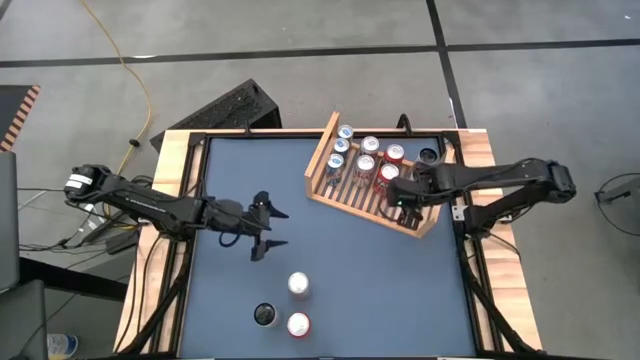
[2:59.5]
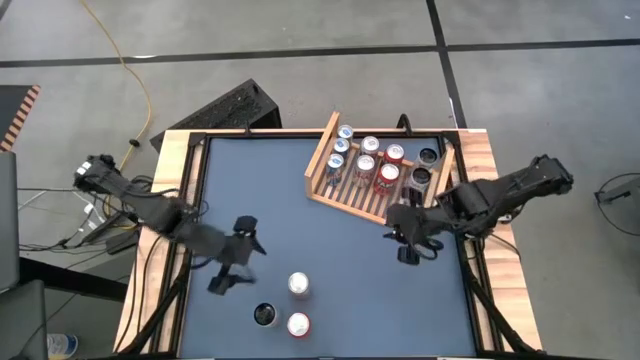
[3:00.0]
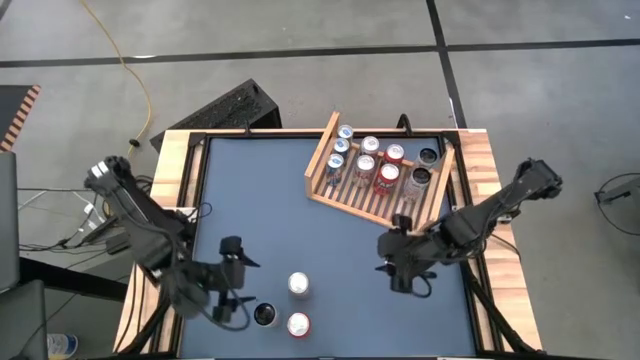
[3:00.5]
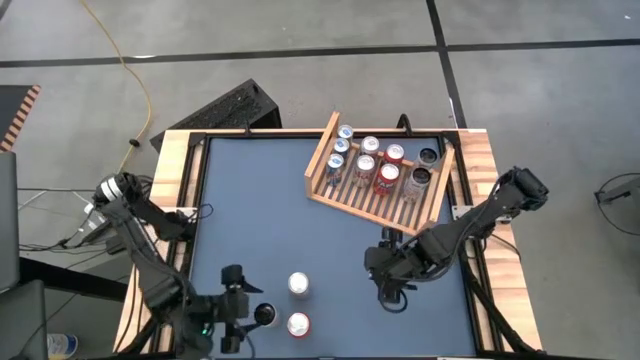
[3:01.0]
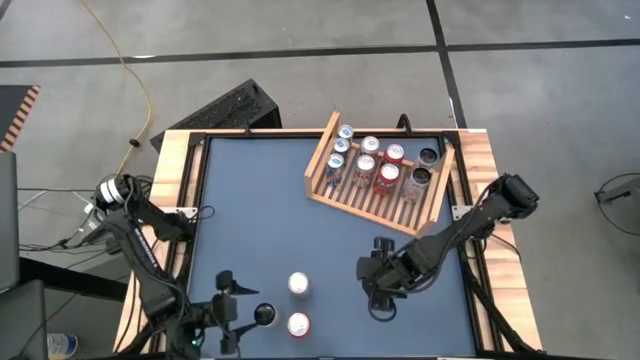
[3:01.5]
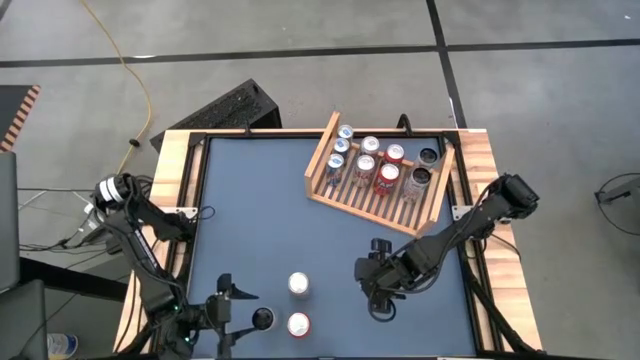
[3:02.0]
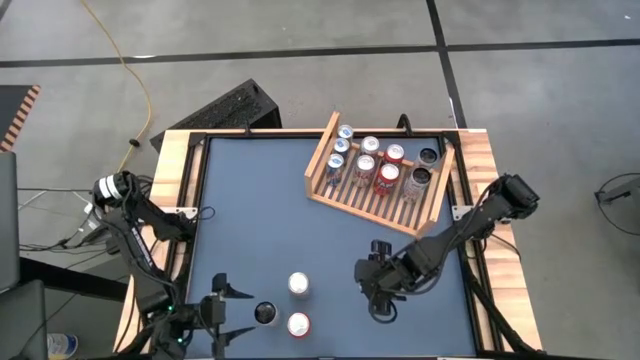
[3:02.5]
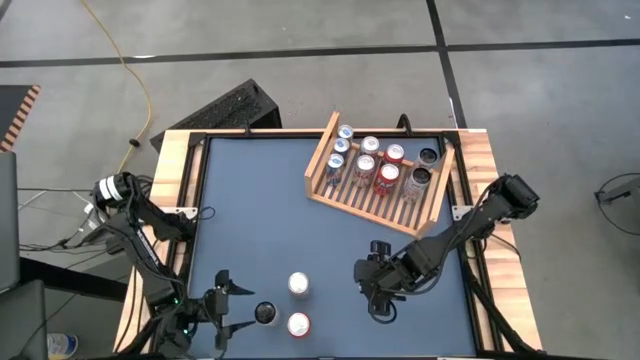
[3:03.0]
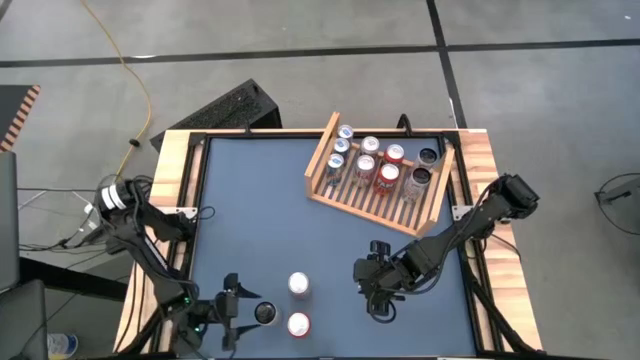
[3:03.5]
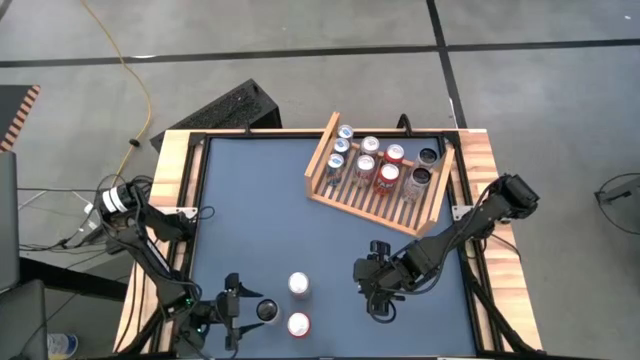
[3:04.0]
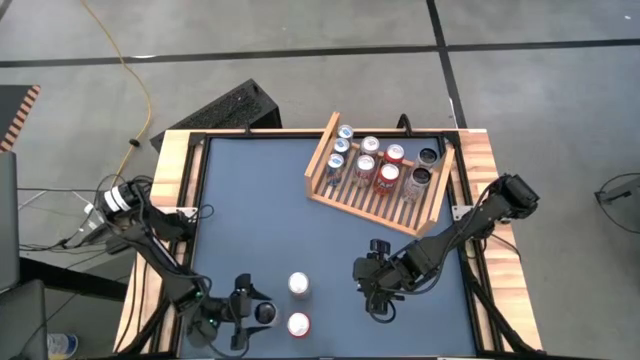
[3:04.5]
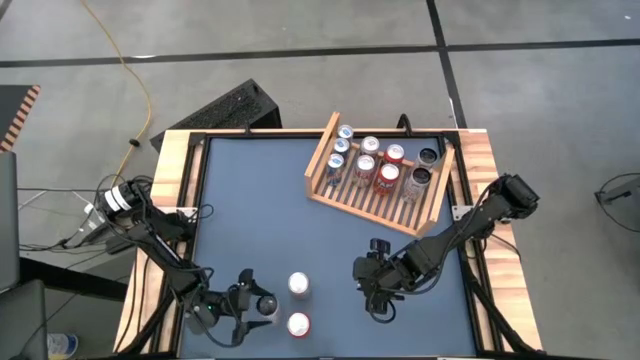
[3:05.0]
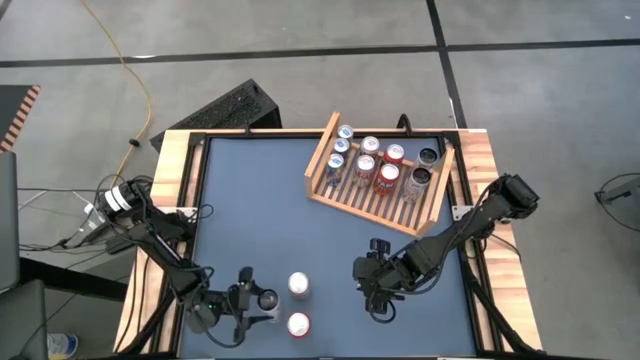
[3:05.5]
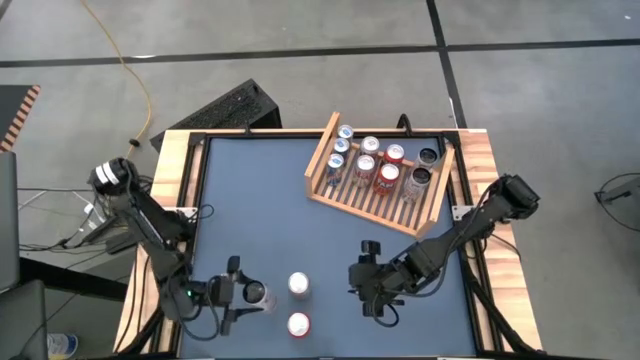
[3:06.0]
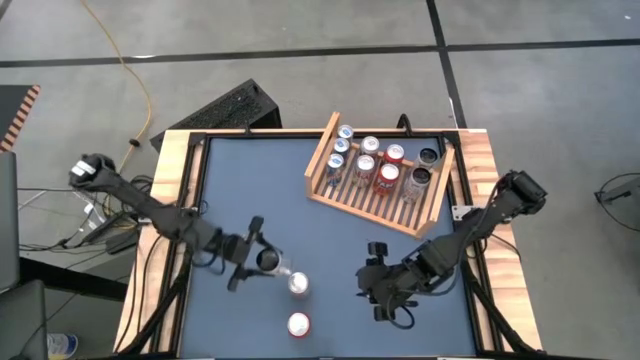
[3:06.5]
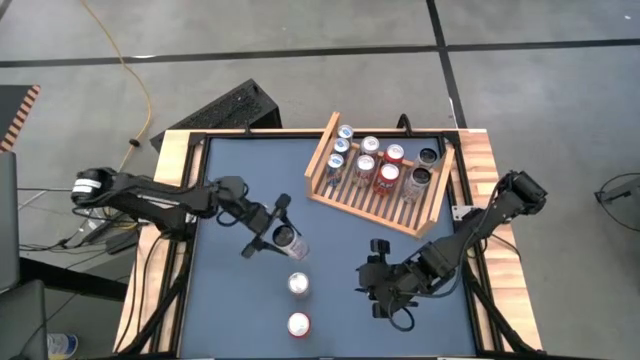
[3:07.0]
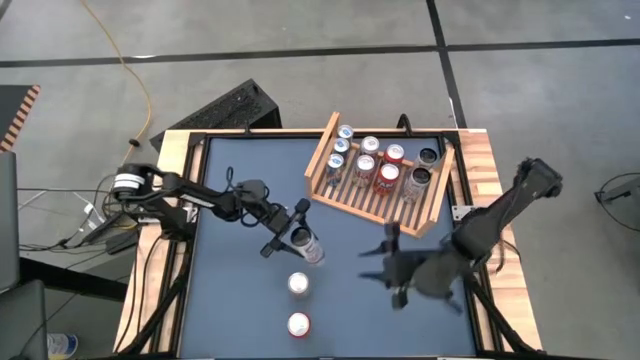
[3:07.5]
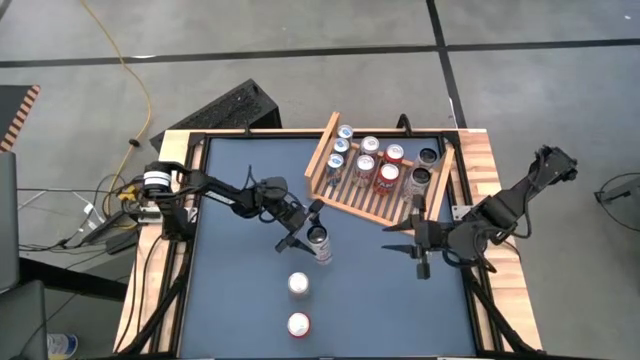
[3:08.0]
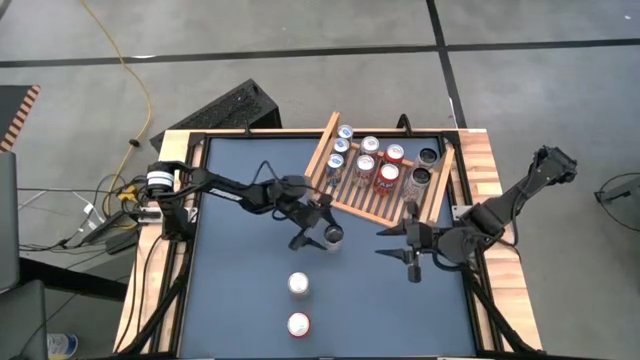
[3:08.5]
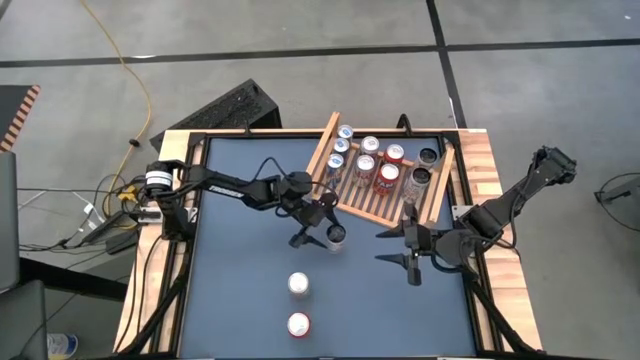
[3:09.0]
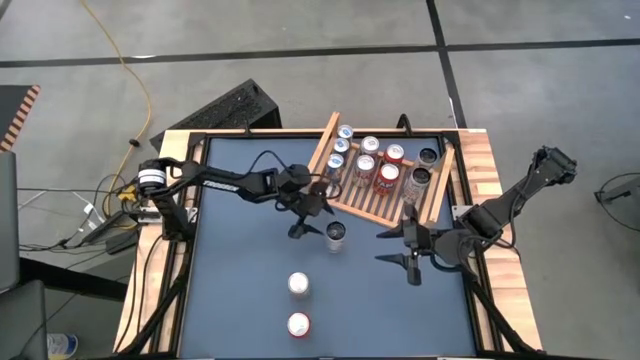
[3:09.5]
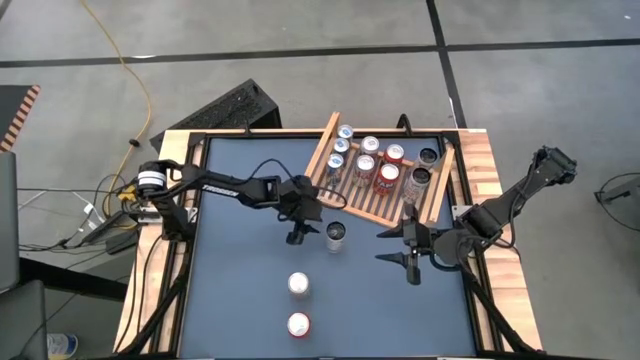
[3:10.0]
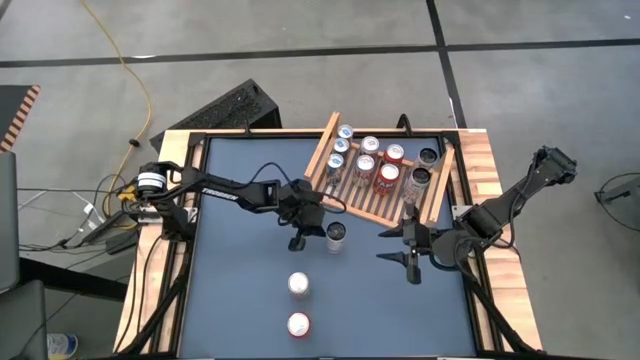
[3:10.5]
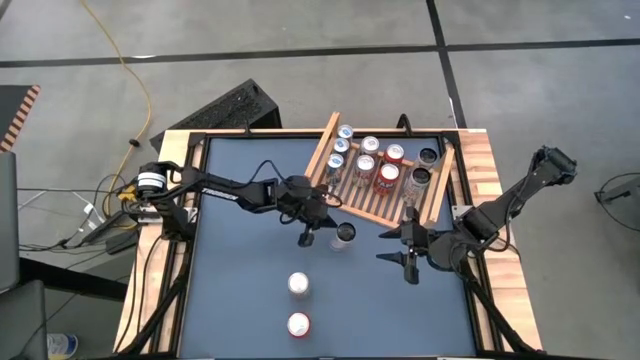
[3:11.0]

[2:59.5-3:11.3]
Task: Place canned beverage on shelf
Move the white and pink soda can to the center of the table

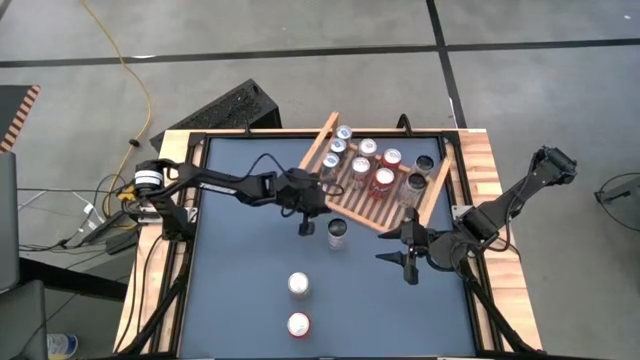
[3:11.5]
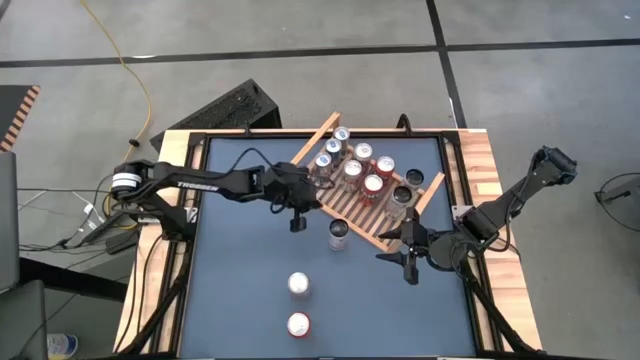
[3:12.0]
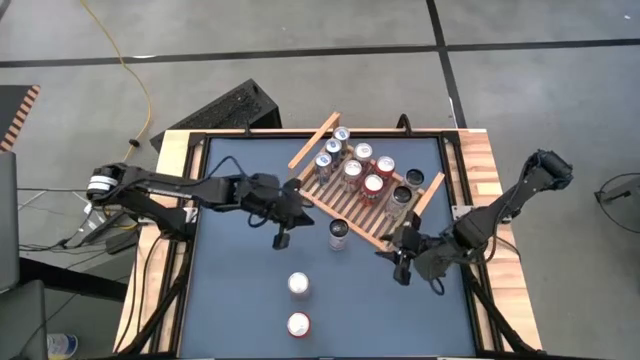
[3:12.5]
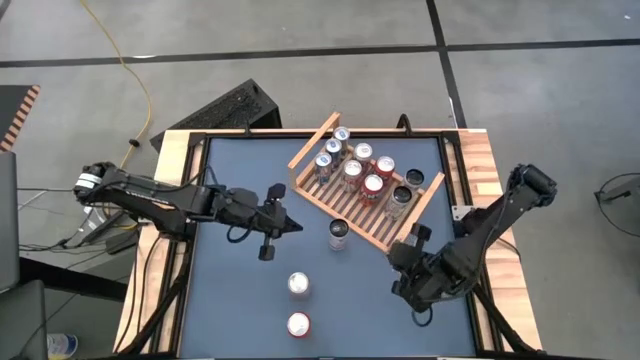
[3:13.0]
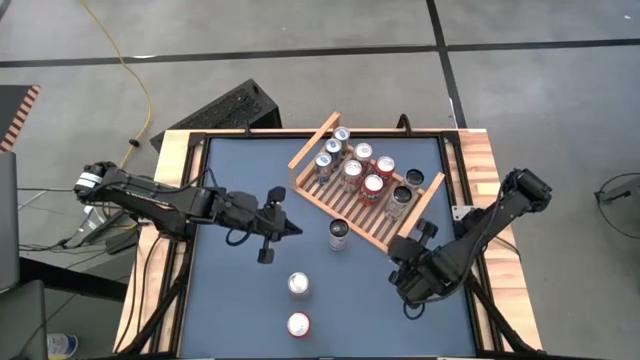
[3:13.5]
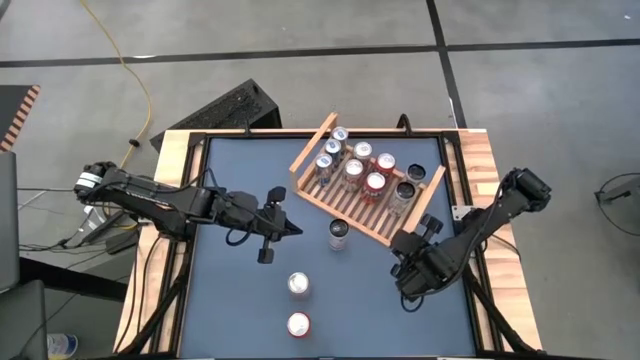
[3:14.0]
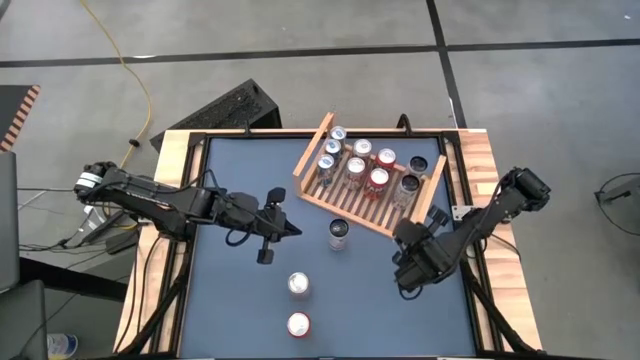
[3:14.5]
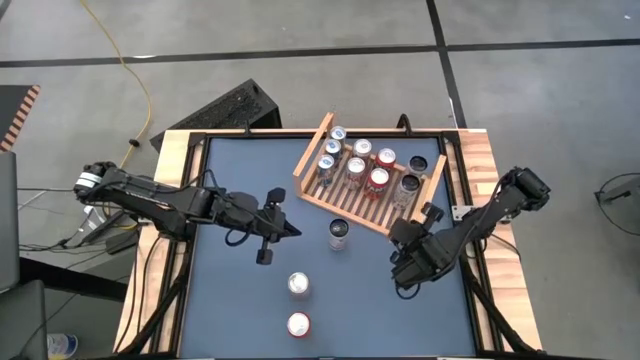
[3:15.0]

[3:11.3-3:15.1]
Adjust the shelf

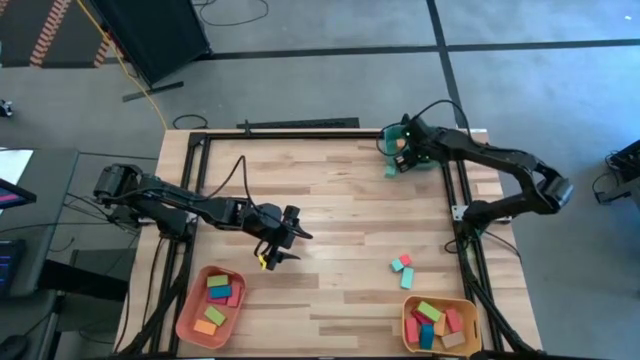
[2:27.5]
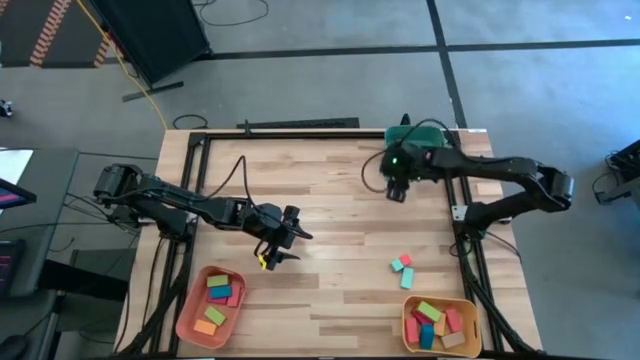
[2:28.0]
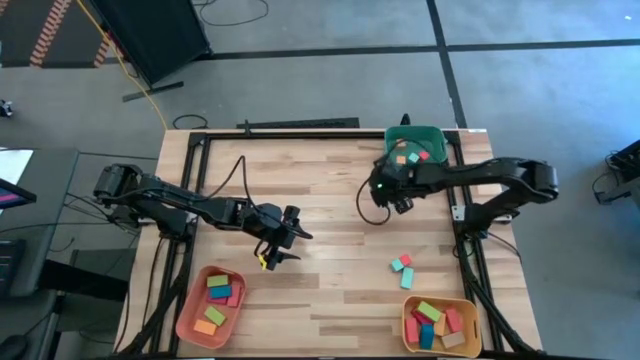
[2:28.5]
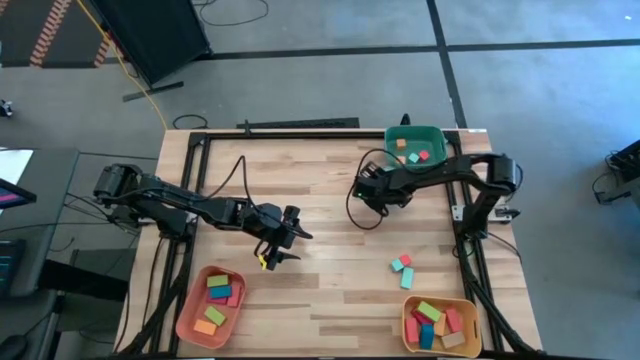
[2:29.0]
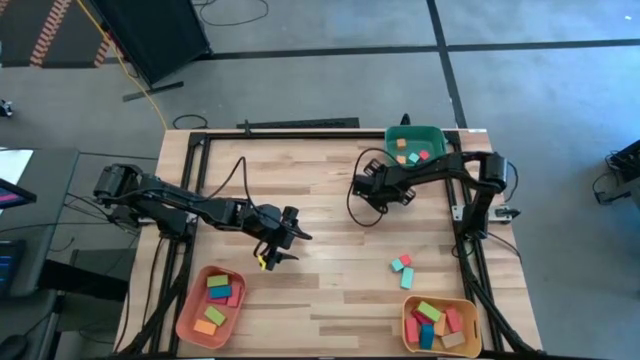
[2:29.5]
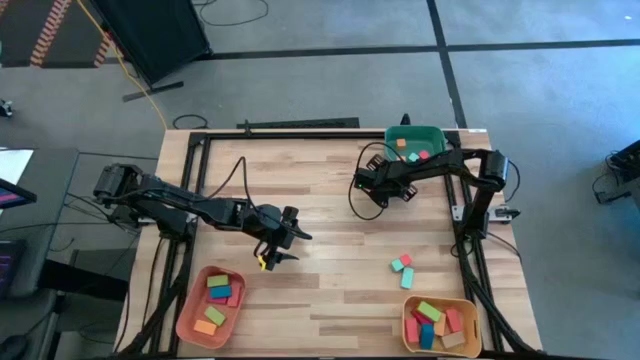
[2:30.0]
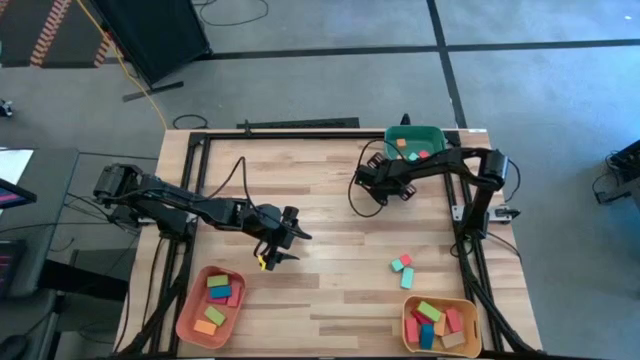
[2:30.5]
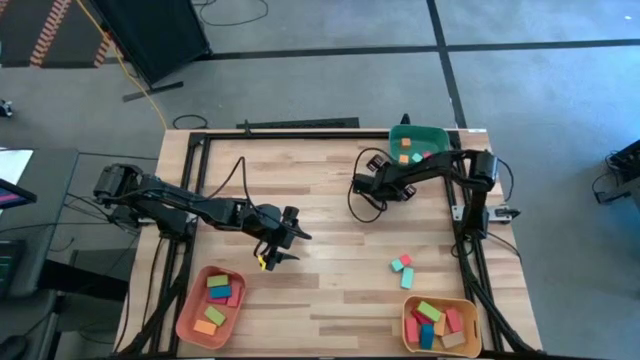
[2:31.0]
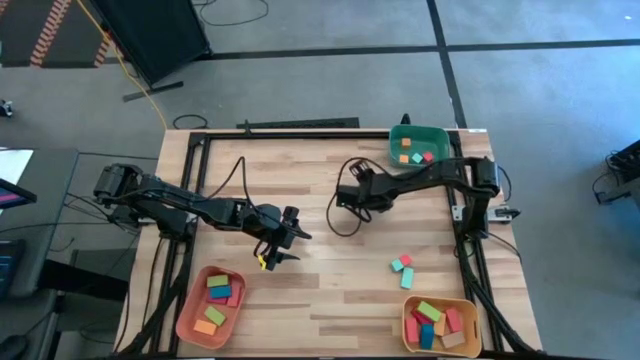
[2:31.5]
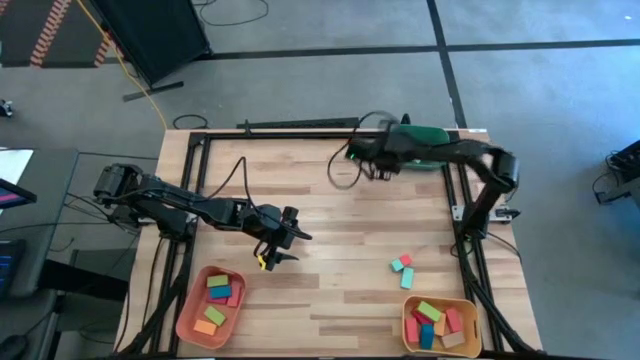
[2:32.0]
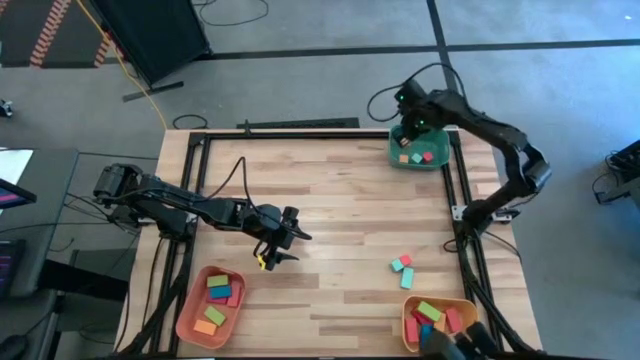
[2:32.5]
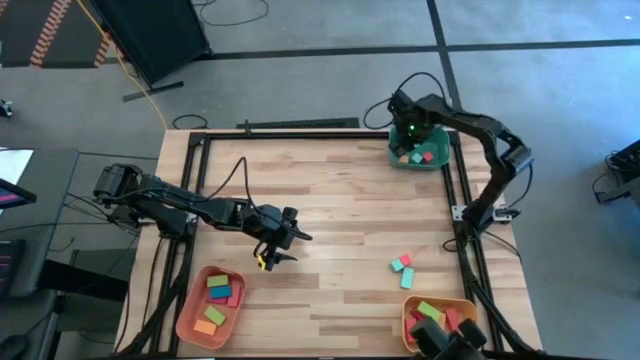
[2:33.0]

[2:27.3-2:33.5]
Task: Sort blocks by size
Put the small blue square block into the blue bin
